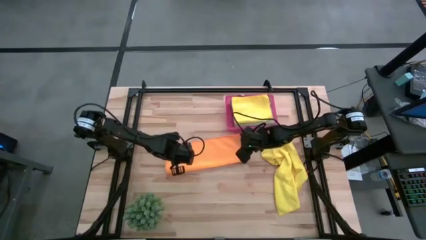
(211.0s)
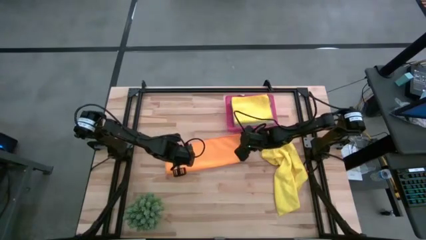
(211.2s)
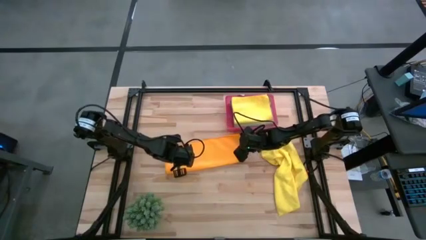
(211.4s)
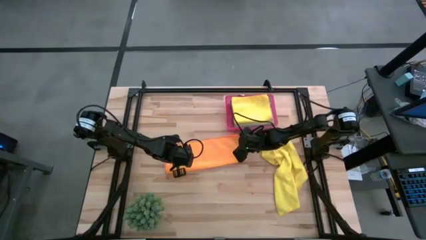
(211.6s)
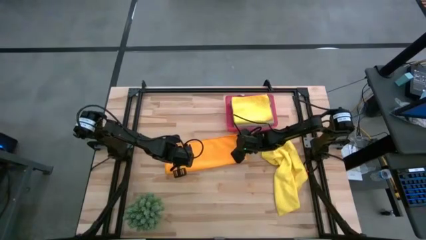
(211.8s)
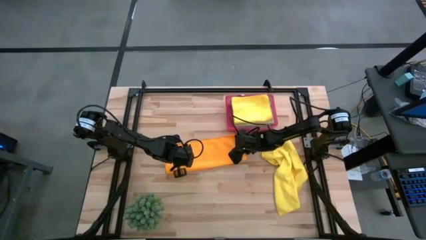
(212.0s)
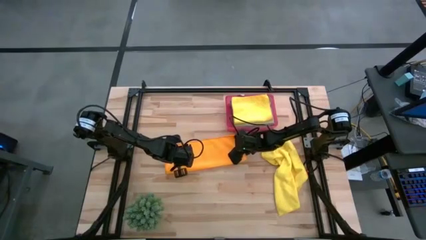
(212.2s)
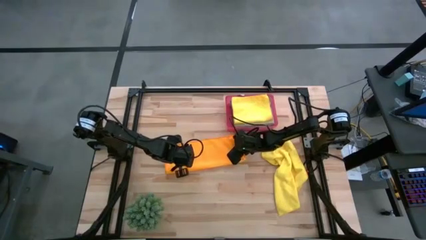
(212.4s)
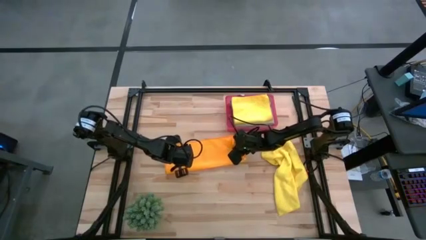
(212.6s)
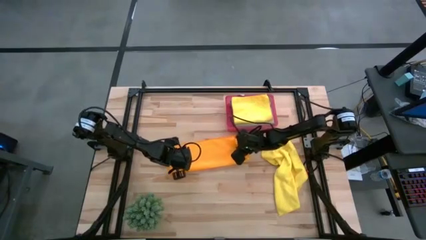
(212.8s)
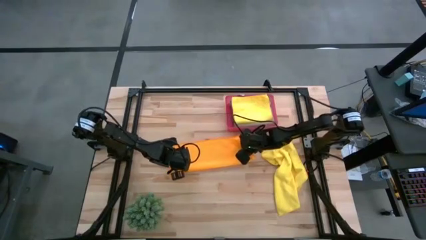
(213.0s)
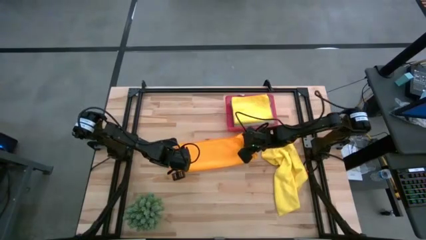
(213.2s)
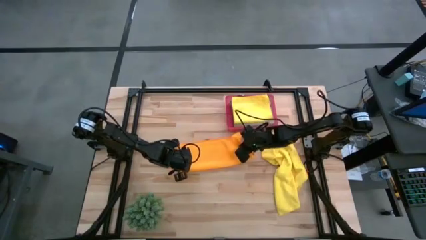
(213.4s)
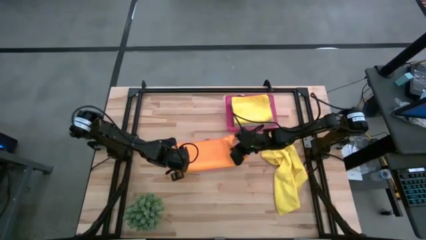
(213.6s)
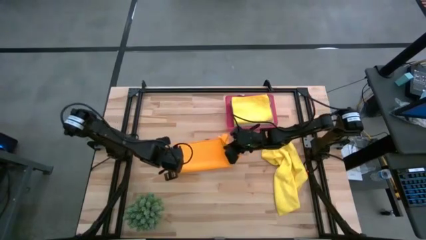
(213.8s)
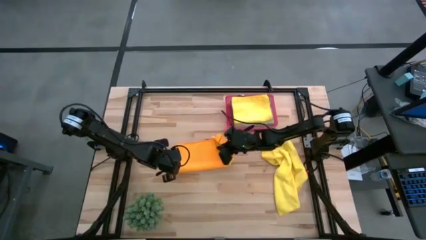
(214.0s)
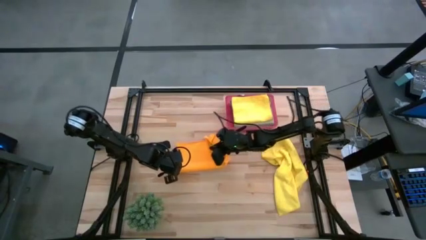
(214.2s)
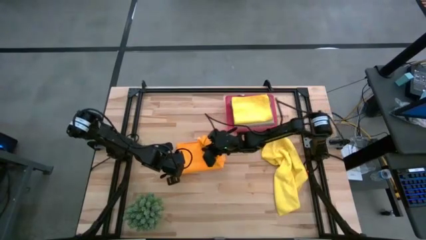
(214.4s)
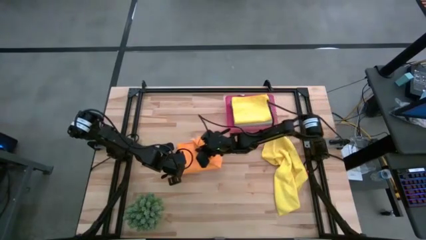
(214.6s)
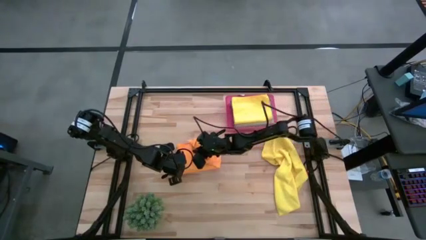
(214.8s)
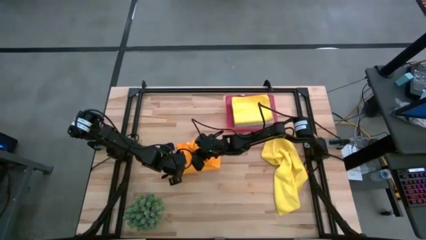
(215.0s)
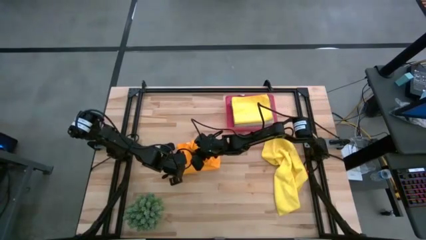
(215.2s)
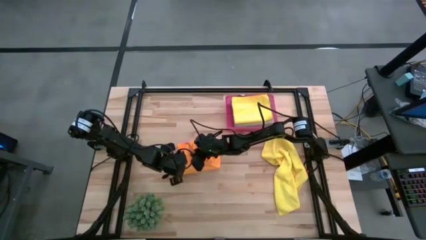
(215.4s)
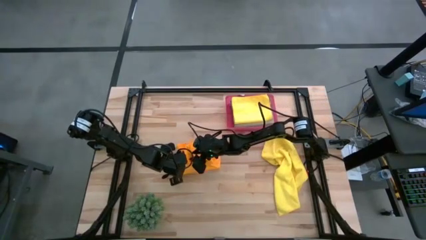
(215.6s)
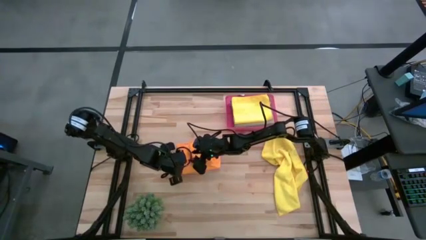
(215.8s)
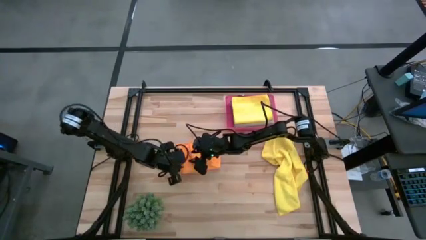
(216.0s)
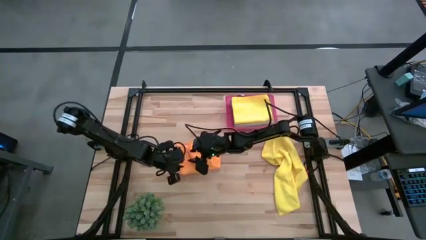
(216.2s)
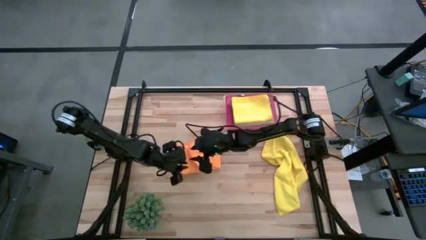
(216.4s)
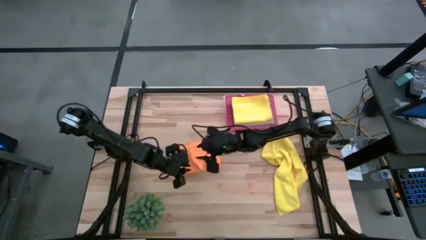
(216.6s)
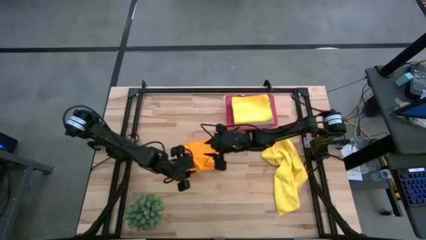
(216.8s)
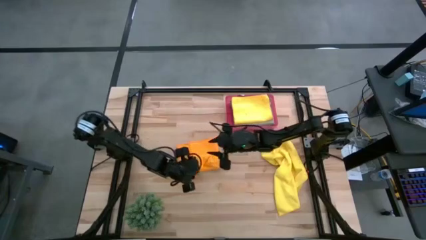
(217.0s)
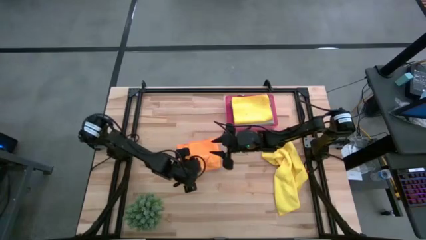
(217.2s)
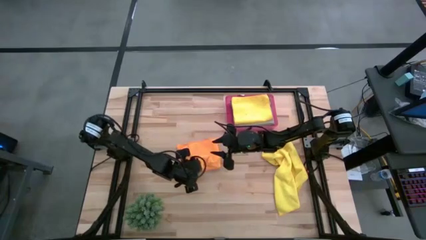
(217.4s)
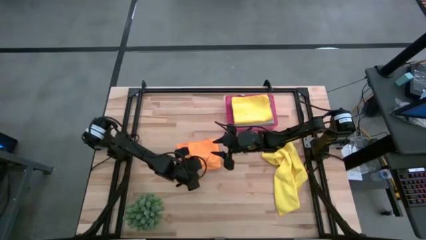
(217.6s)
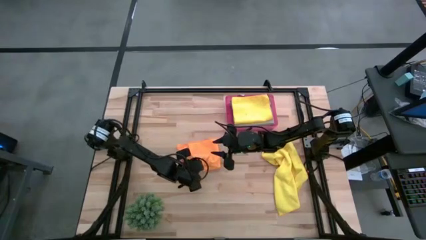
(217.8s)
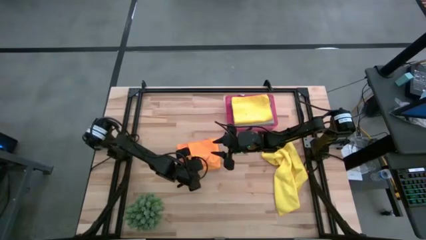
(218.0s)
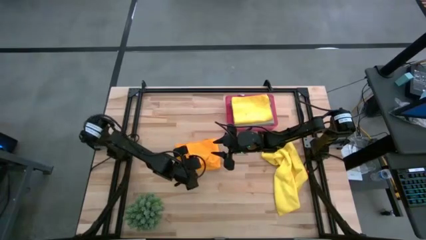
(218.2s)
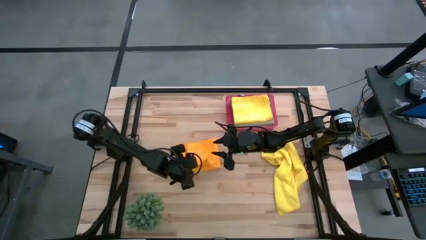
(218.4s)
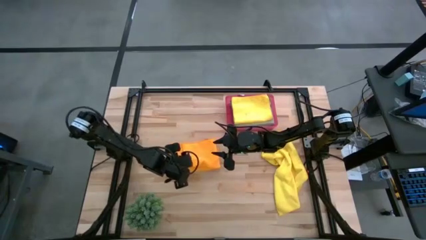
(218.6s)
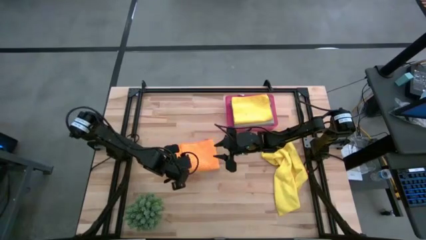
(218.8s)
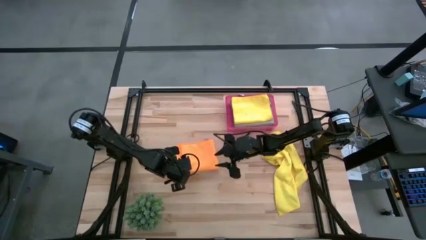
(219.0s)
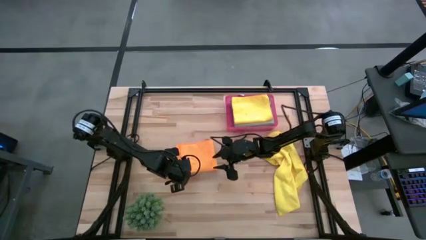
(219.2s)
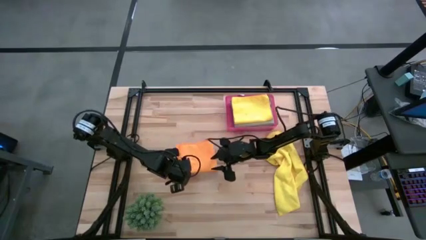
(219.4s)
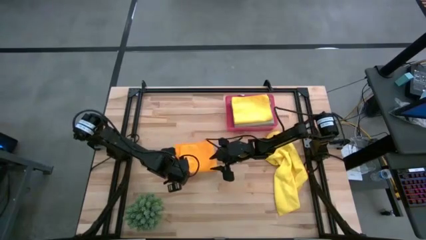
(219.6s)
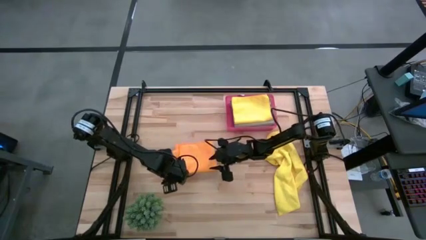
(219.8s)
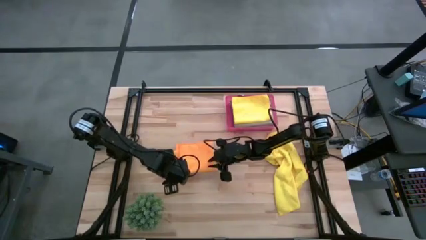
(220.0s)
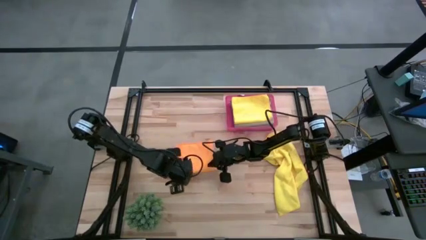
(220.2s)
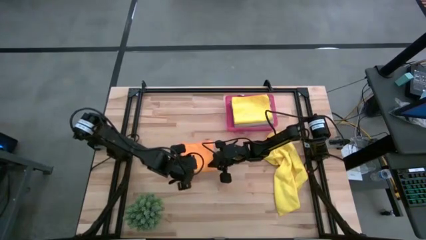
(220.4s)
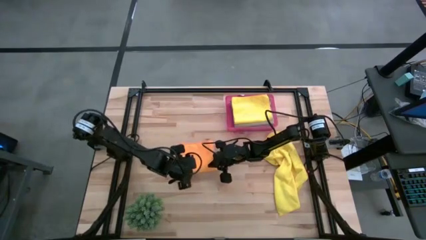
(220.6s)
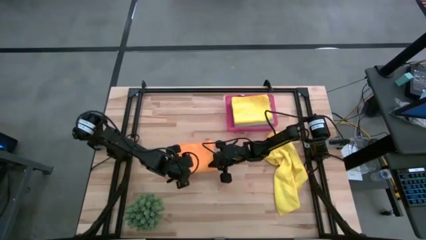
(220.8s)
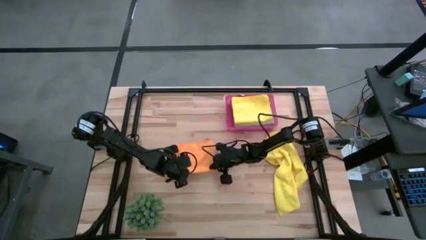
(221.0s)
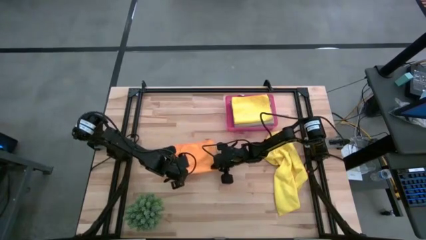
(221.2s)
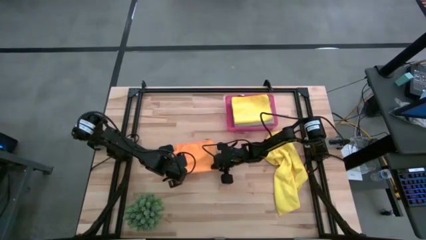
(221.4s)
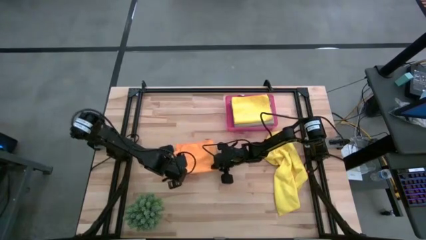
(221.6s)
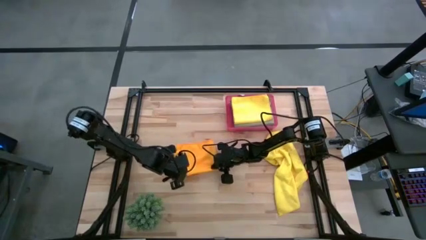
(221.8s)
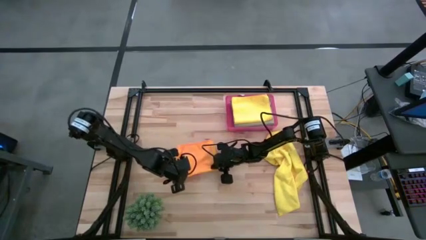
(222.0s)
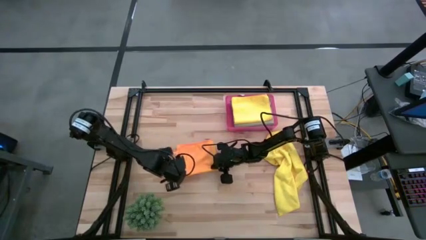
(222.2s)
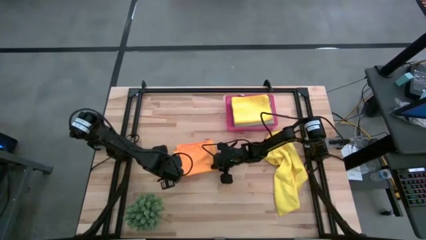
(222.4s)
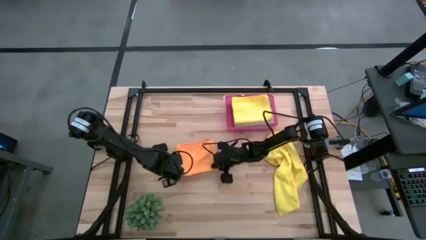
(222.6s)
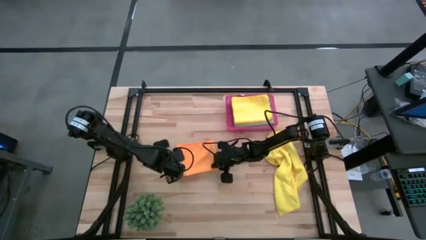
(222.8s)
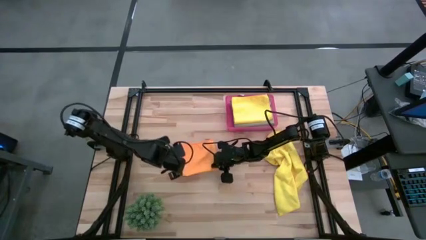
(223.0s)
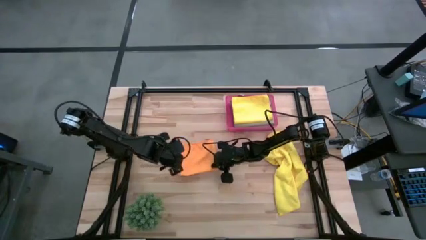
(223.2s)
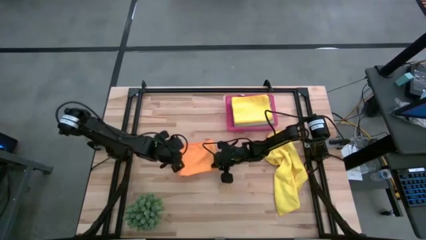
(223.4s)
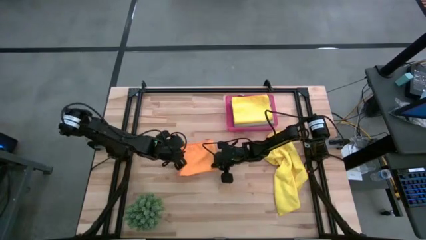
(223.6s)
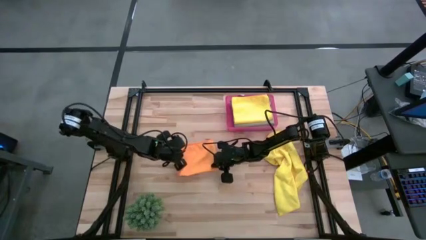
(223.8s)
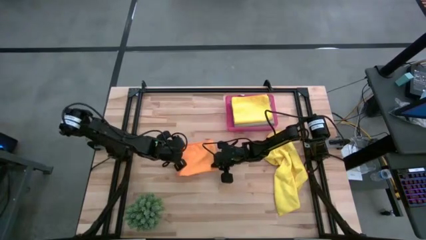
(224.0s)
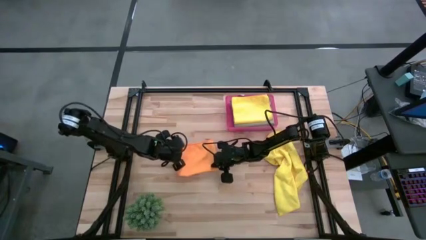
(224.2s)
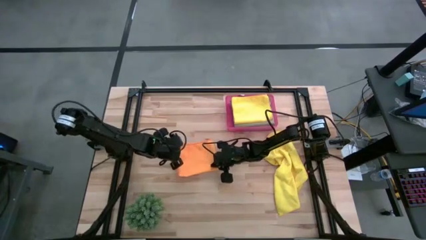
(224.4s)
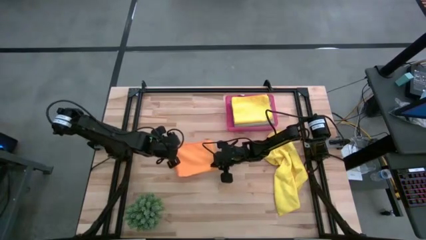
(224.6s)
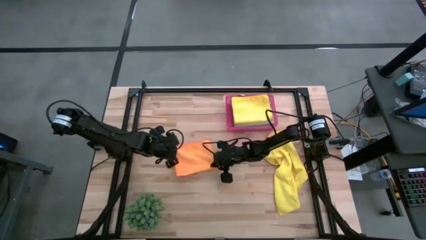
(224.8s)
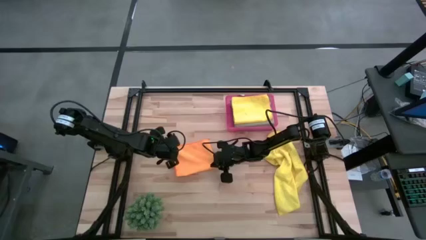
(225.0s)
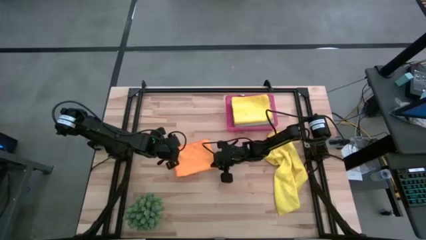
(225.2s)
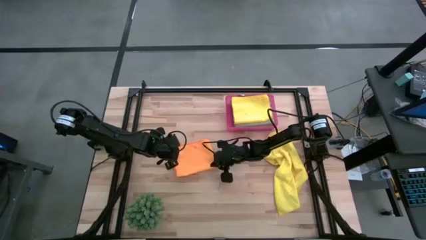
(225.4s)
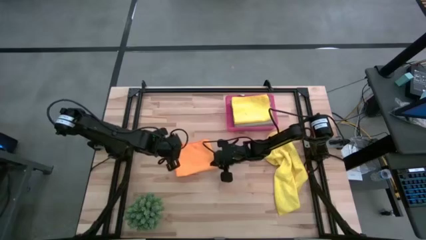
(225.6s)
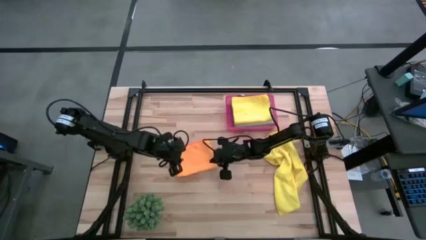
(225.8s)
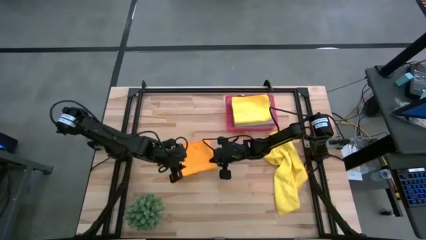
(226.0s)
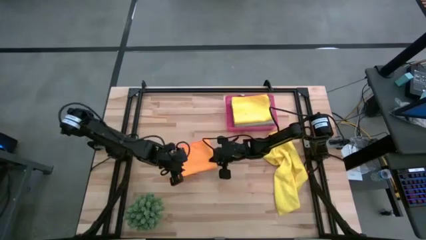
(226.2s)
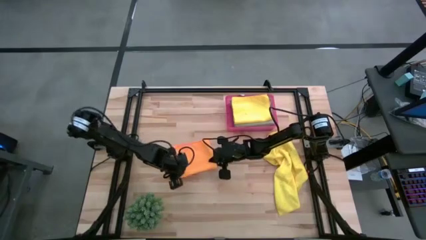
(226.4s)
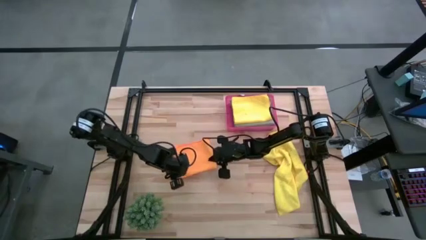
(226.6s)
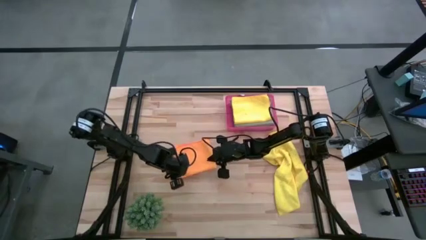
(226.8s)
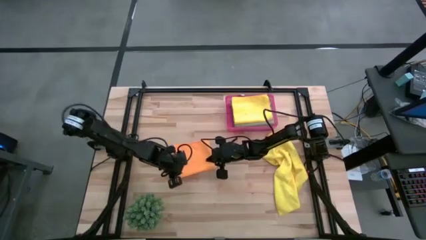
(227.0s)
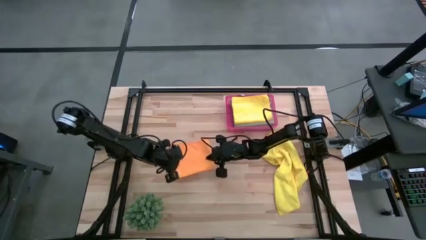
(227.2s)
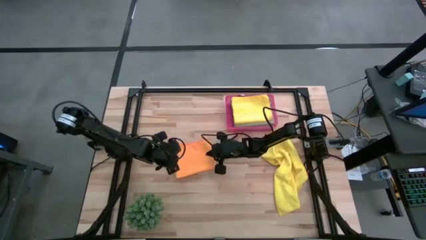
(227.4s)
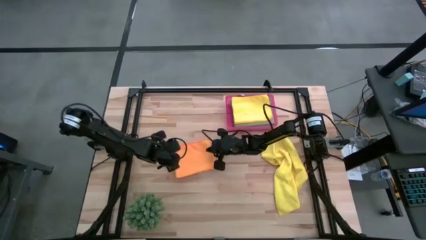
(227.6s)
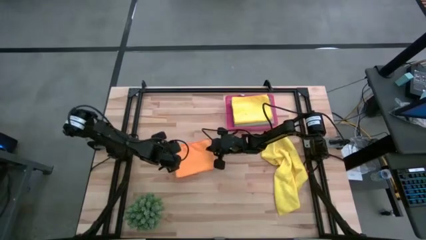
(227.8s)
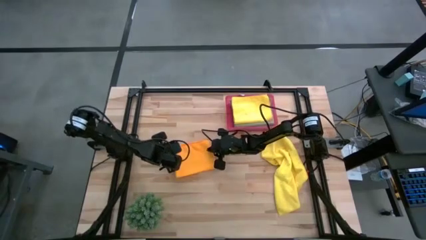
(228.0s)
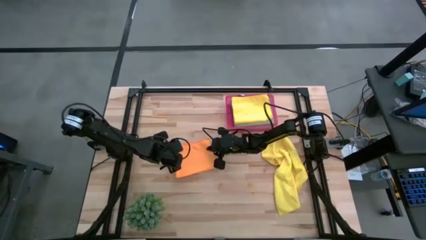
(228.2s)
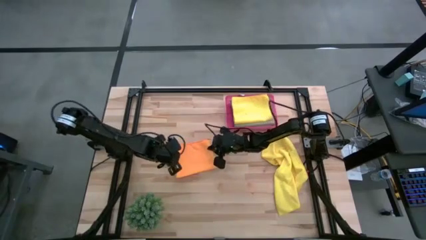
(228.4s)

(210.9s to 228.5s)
Task: Fold microfiber towels
Fold the orange microfiber cloth
